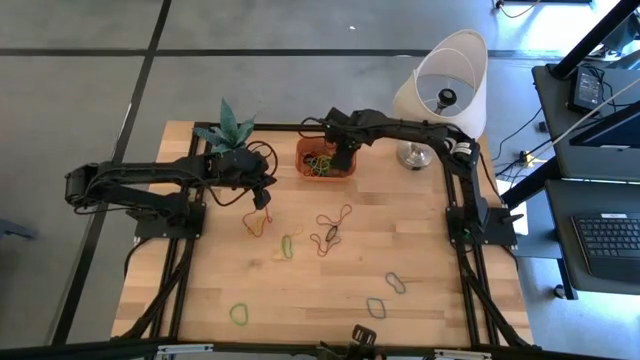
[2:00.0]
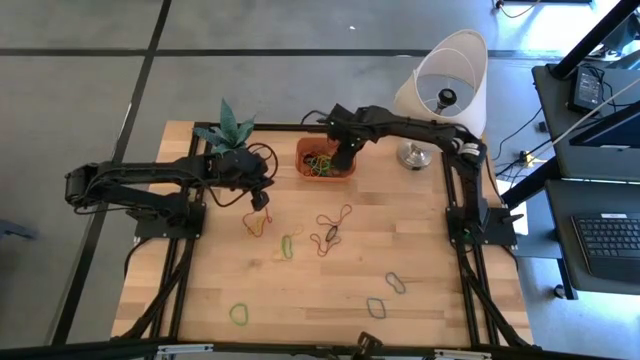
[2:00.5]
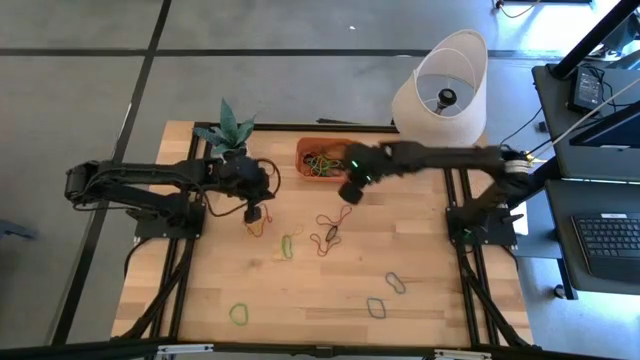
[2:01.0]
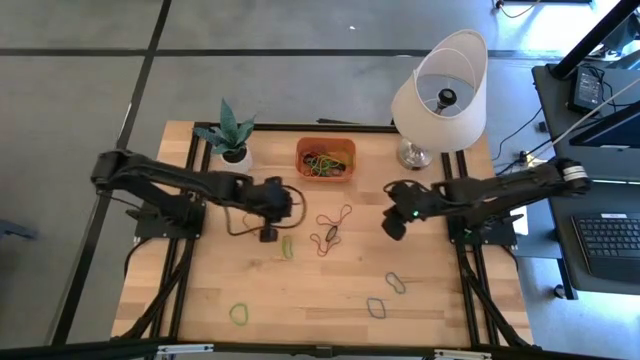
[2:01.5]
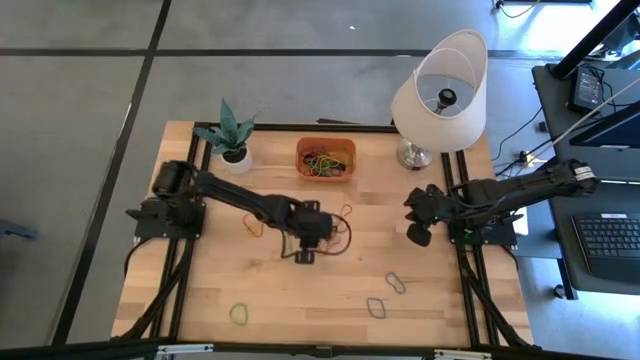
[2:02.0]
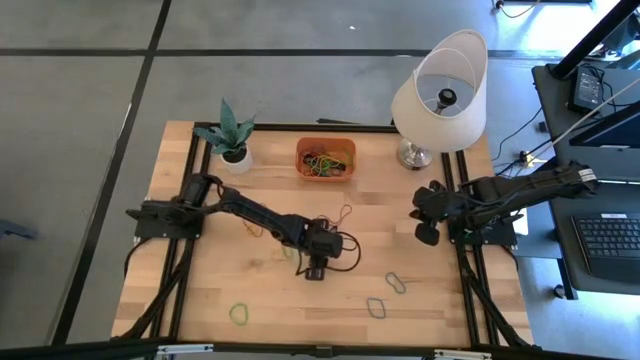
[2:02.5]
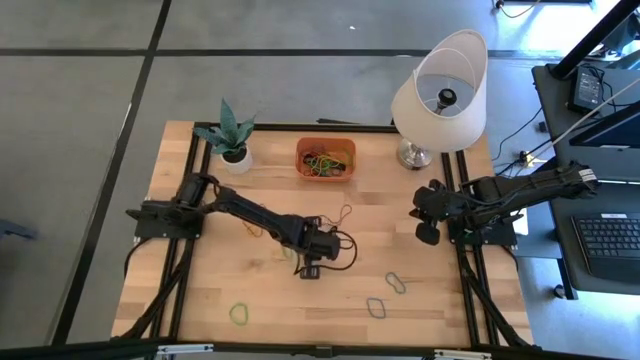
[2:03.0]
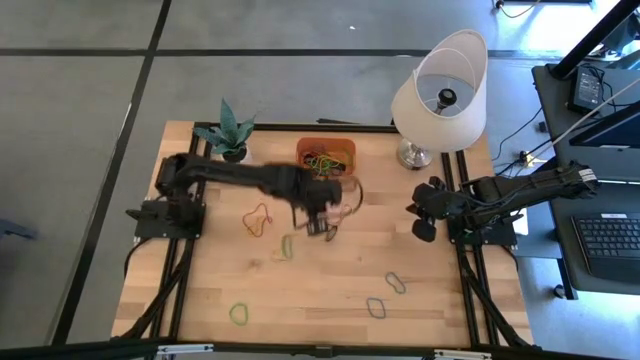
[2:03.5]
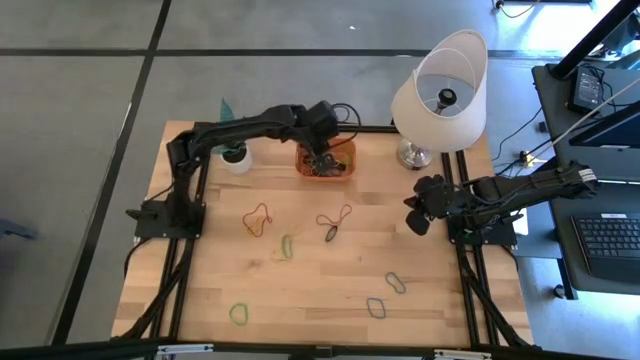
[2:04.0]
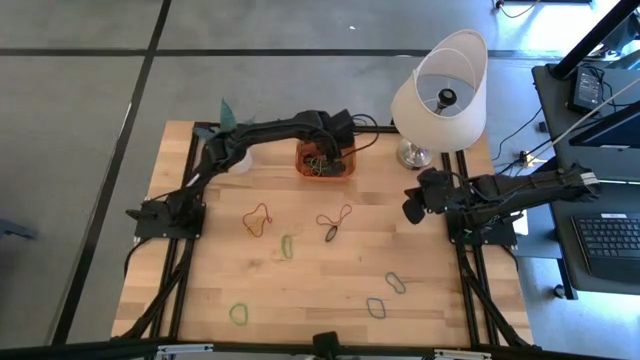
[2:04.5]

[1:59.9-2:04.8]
Task: Pick and place rubber bands into bin
Put the bottom red rubber band into the orange bin

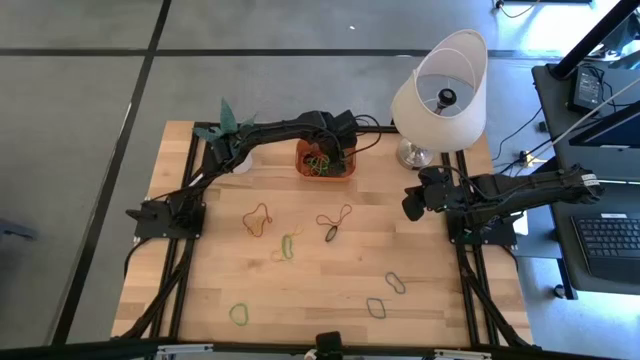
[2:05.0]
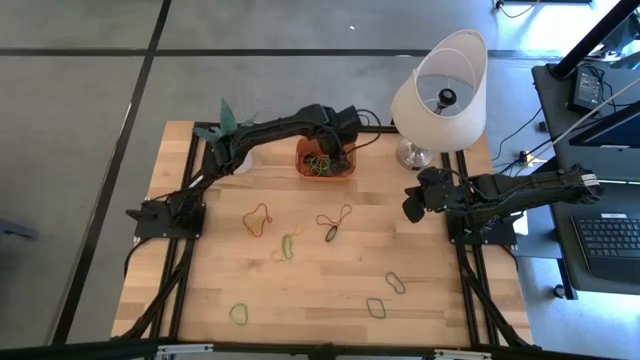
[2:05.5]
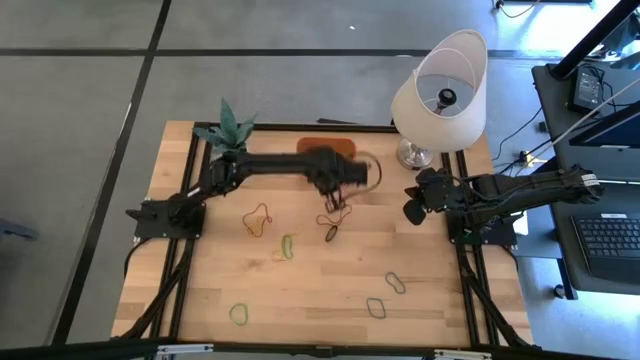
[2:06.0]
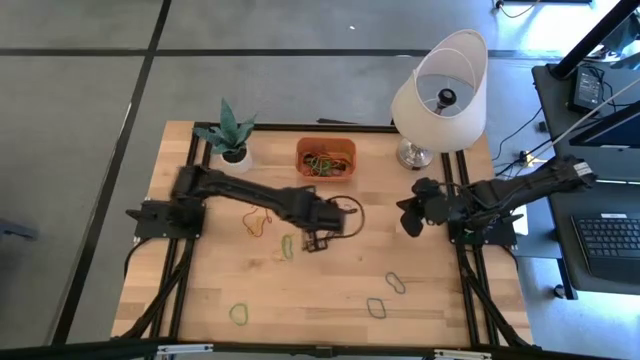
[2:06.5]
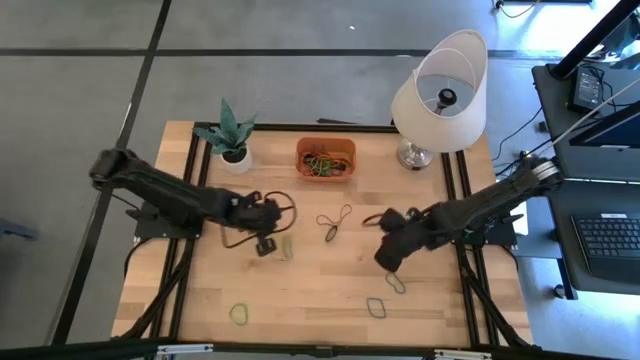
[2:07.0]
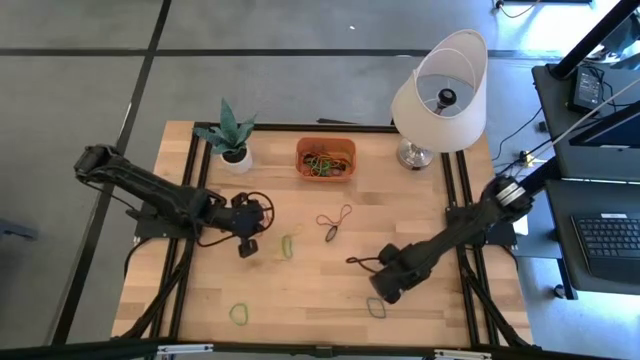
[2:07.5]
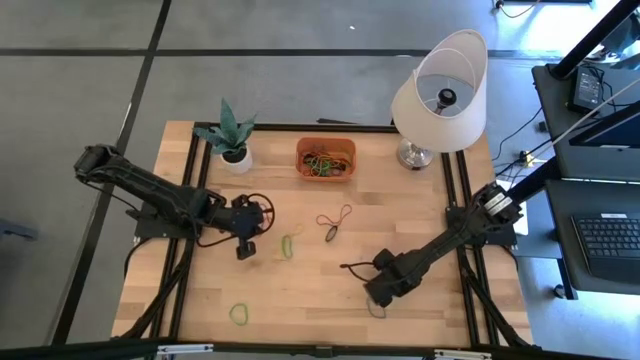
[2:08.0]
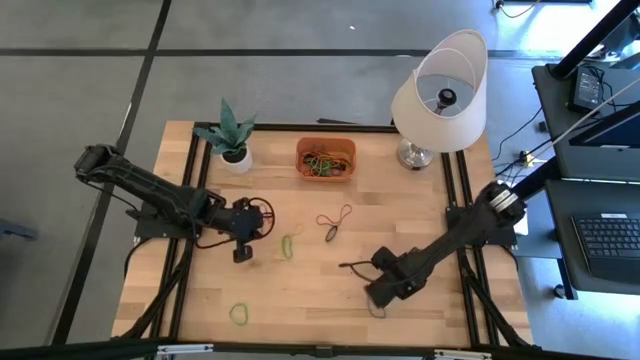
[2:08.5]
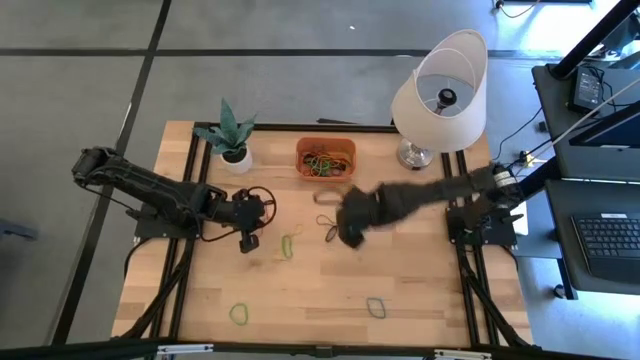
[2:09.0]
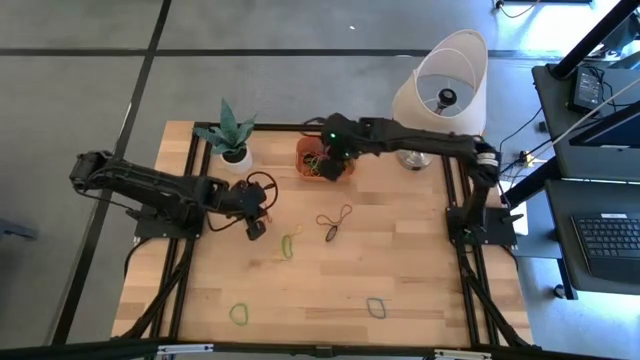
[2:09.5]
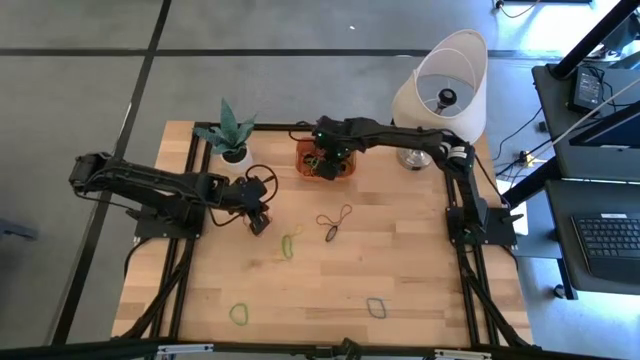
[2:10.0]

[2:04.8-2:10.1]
Put the top blue rubber band into the orange bin

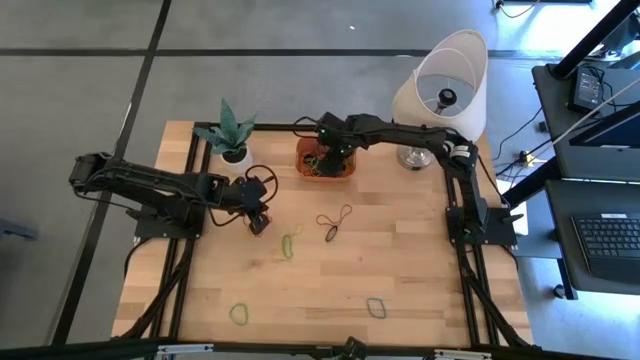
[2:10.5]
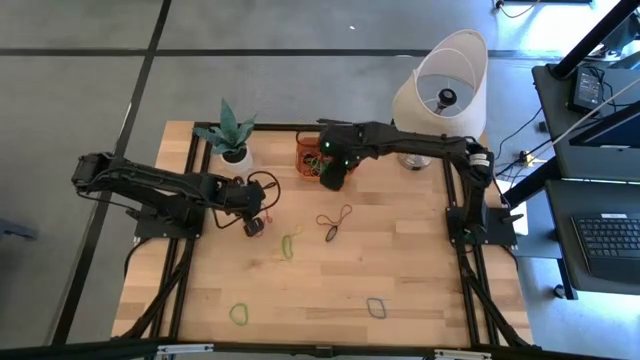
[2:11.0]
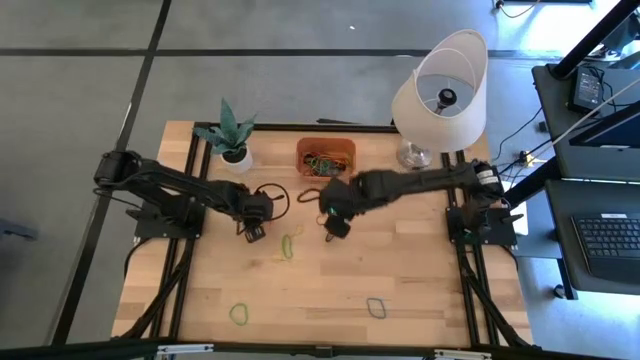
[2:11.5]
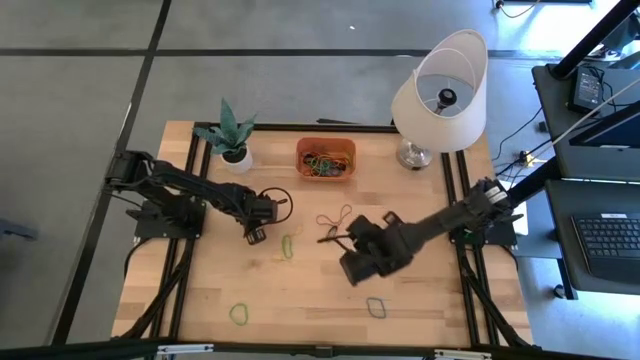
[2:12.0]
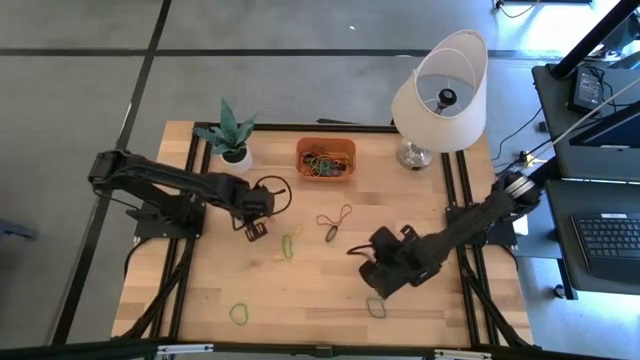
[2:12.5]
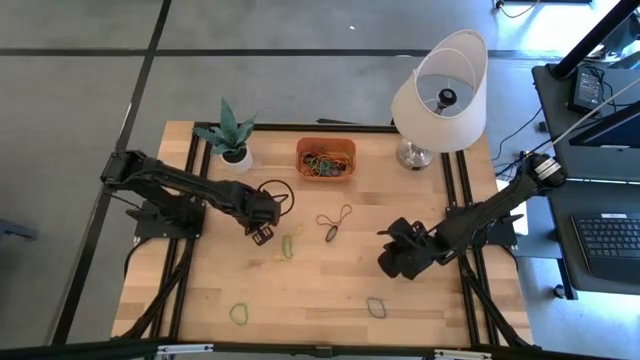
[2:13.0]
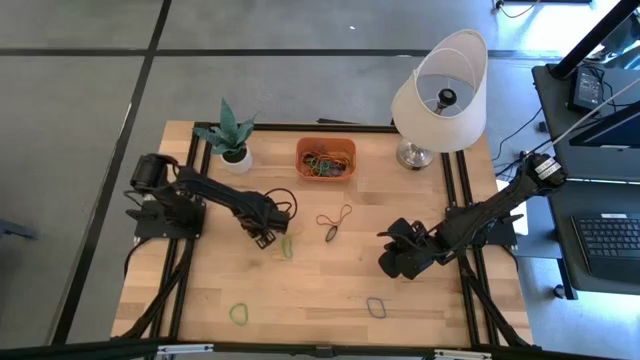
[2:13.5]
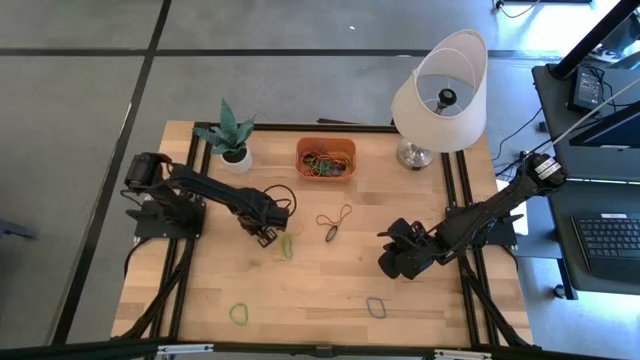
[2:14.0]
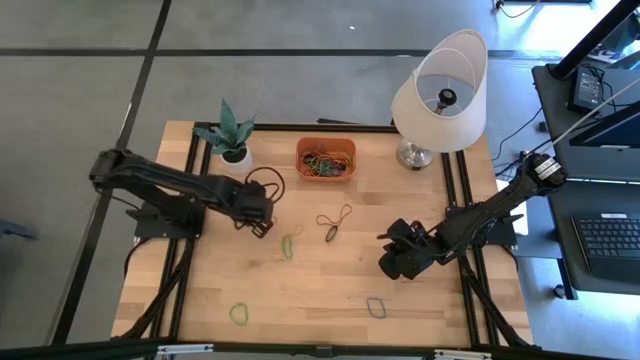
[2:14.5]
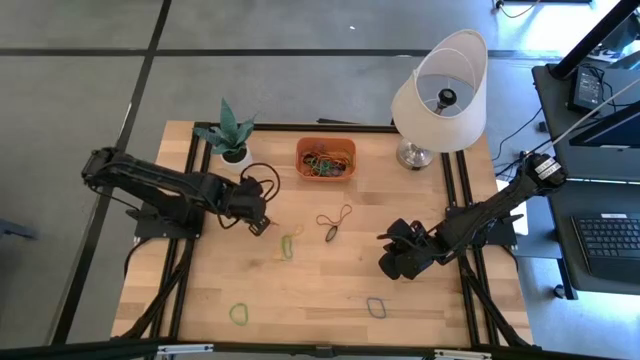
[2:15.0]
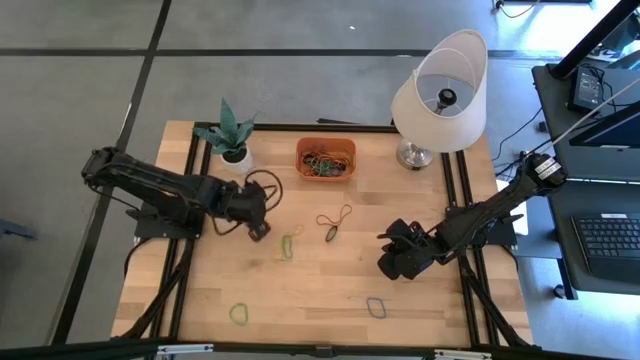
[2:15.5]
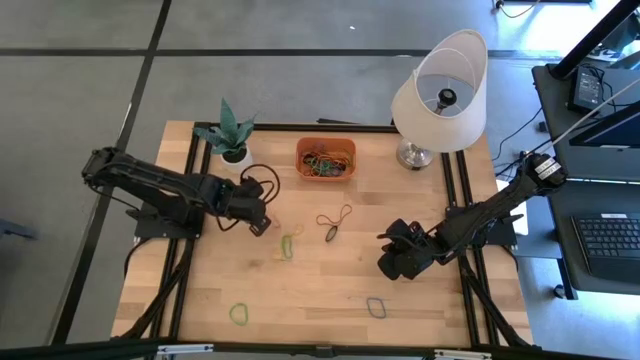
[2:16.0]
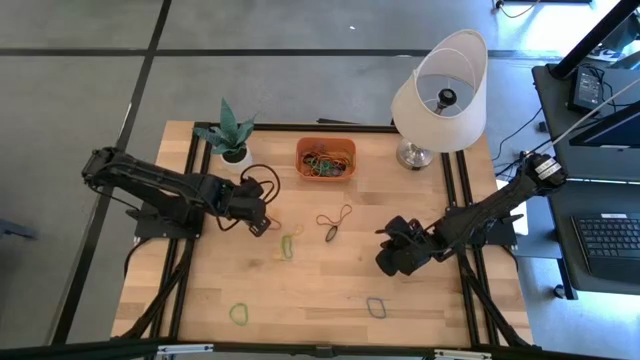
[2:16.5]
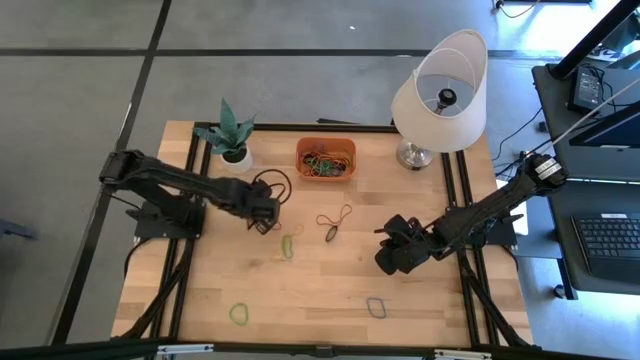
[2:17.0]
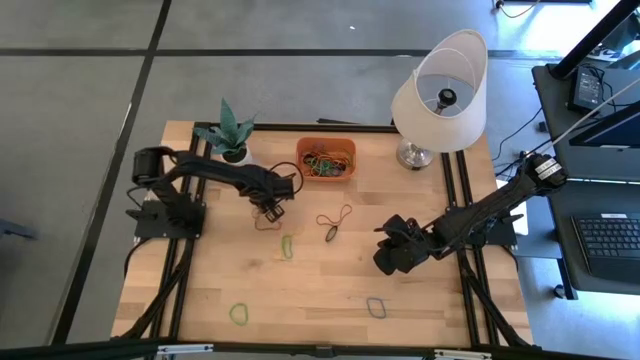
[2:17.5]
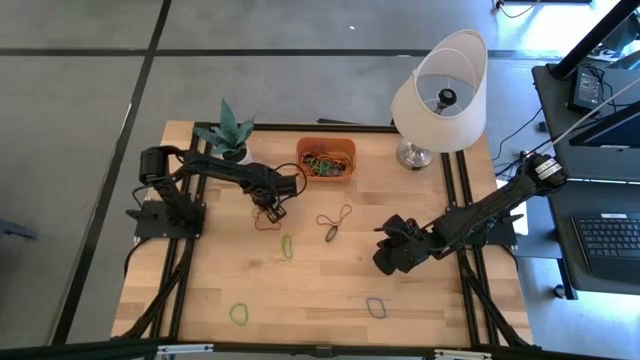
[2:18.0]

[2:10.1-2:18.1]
Put the left yellow rubber band into the orange bin

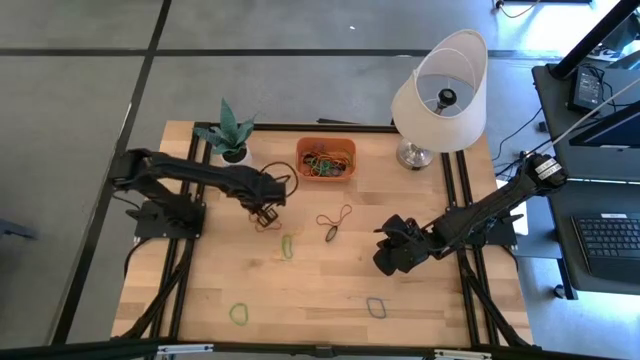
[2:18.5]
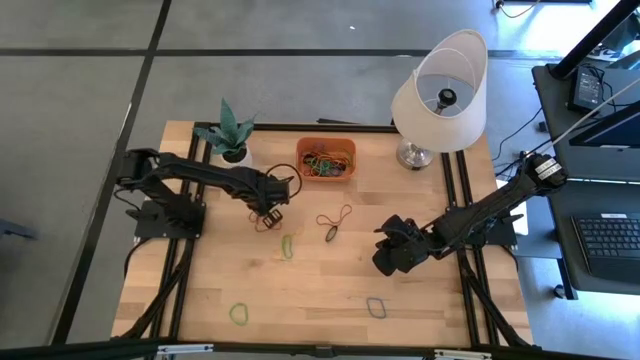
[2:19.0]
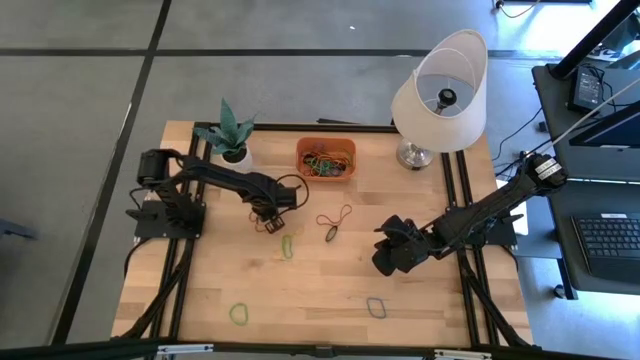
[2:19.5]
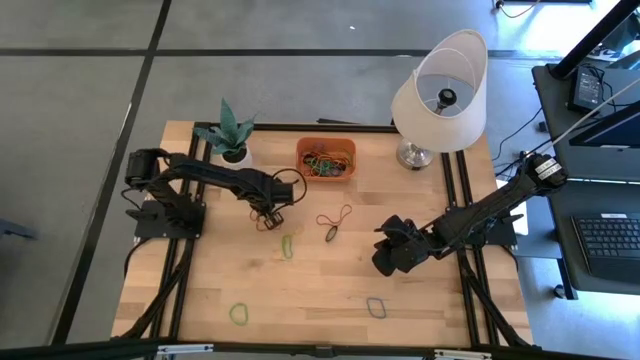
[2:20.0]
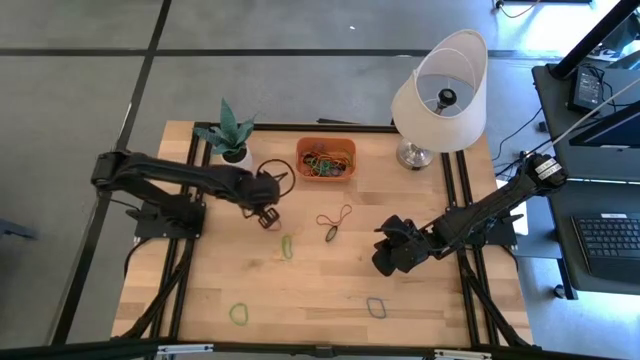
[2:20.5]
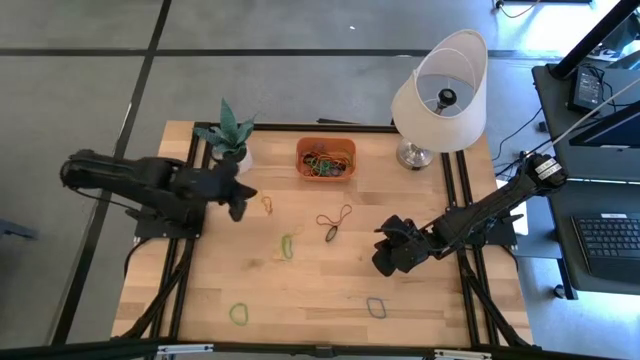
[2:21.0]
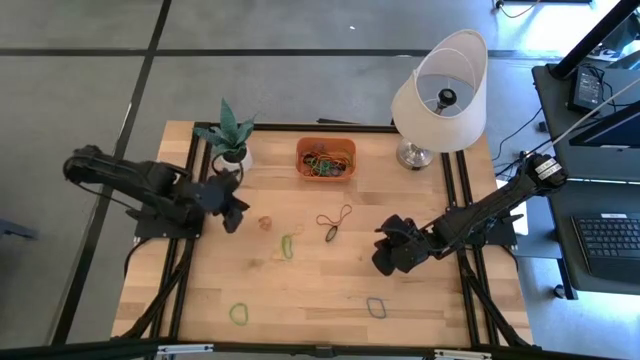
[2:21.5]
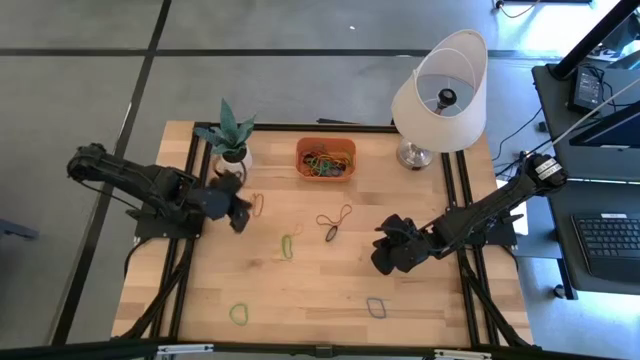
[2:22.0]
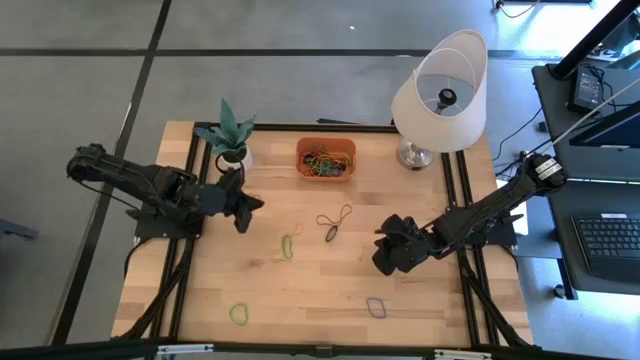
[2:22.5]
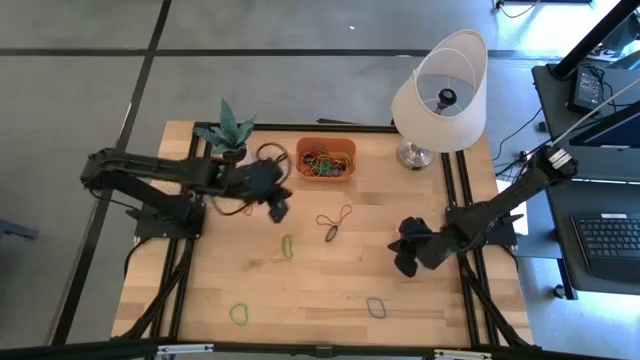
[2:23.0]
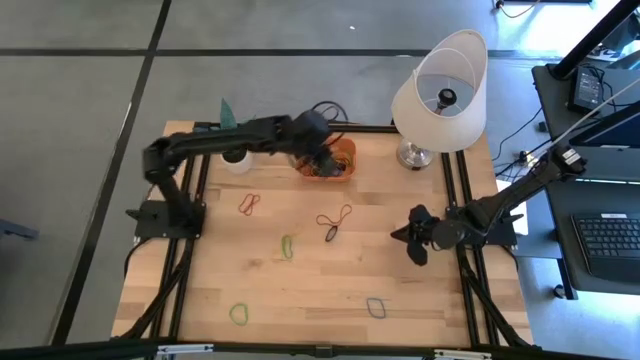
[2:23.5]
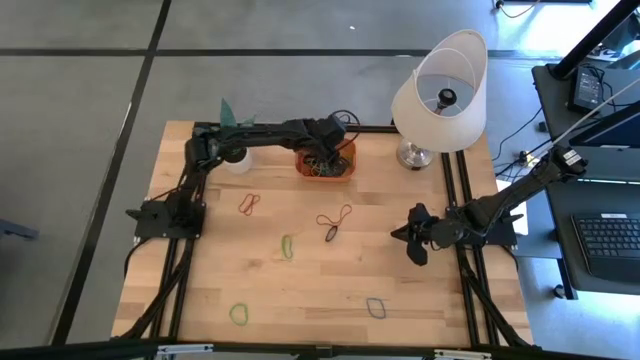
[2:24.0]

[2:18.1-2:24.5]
Put the left yellow rubber band into the orange bin
